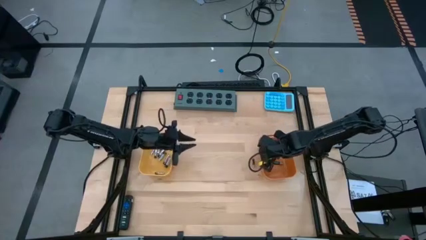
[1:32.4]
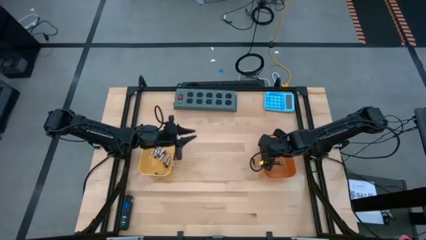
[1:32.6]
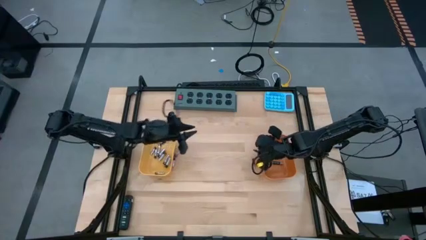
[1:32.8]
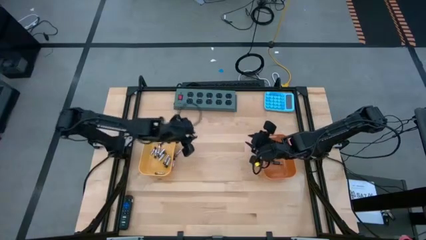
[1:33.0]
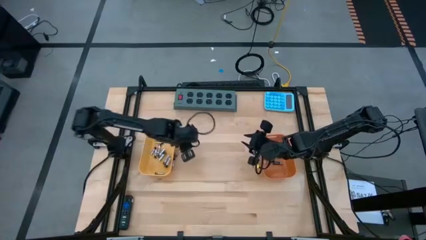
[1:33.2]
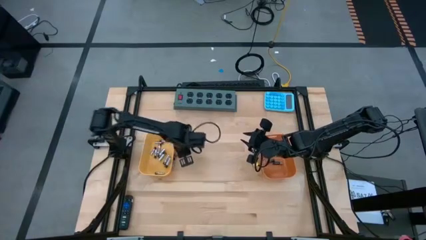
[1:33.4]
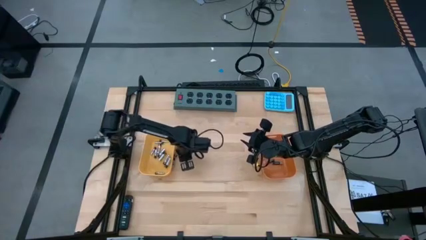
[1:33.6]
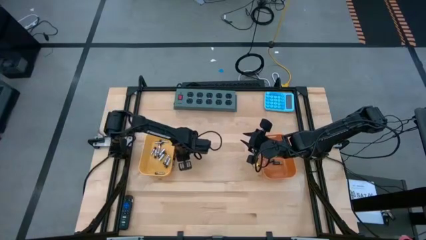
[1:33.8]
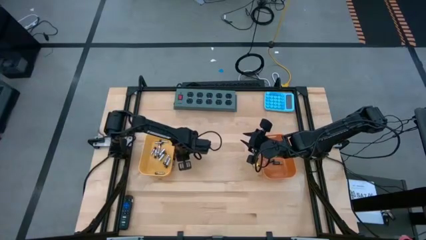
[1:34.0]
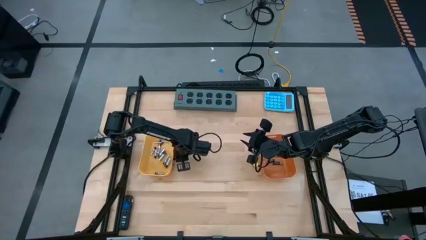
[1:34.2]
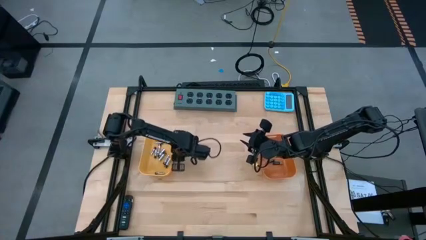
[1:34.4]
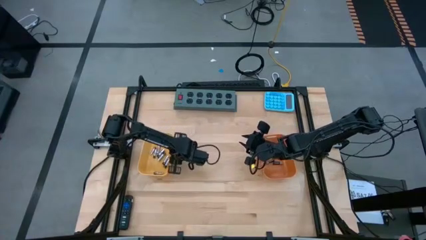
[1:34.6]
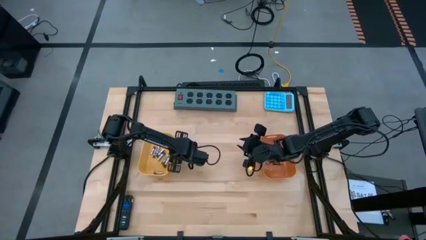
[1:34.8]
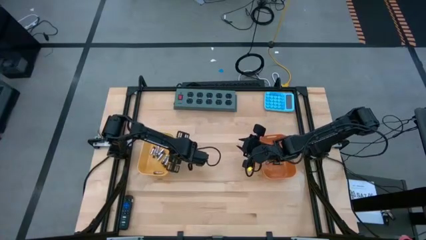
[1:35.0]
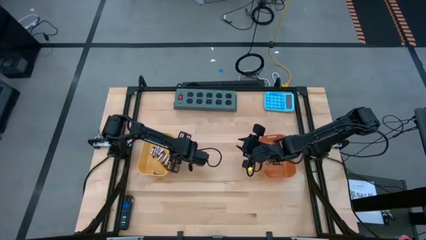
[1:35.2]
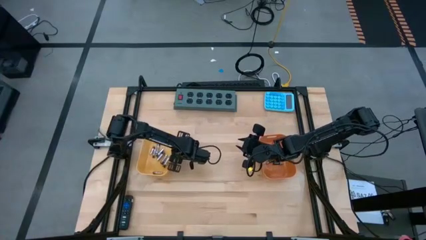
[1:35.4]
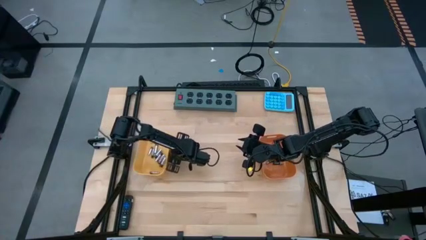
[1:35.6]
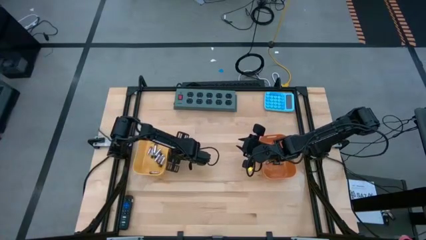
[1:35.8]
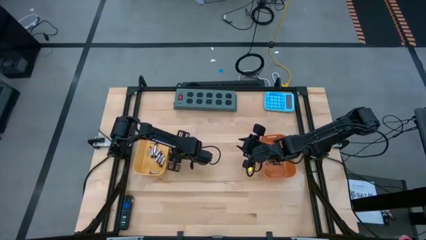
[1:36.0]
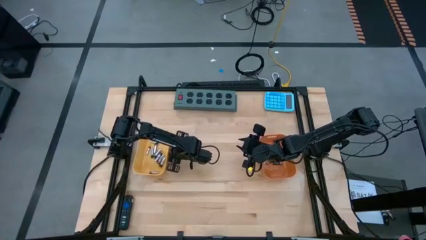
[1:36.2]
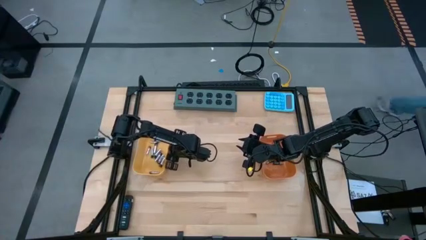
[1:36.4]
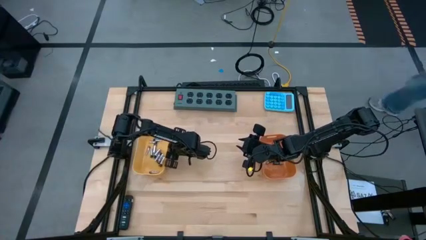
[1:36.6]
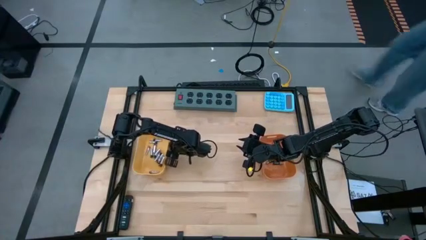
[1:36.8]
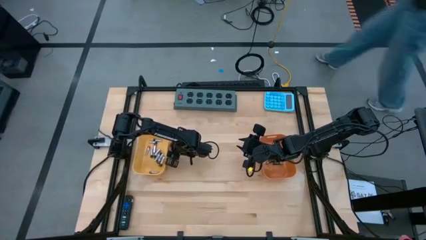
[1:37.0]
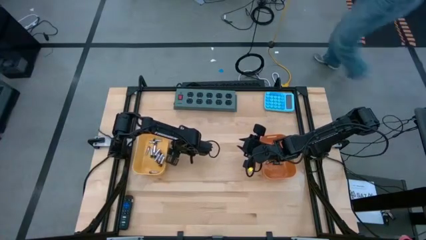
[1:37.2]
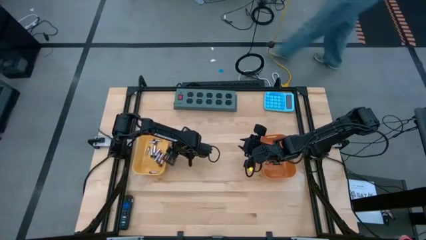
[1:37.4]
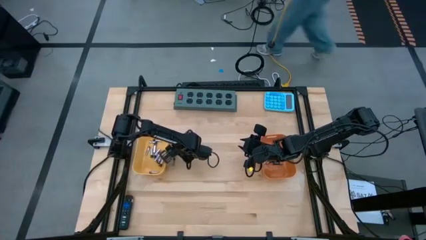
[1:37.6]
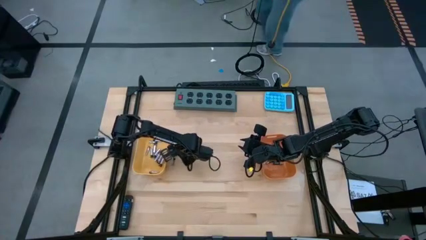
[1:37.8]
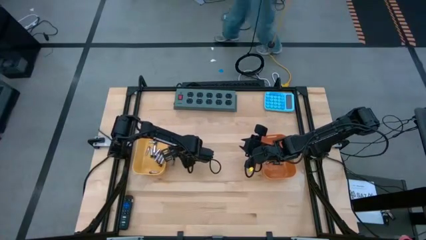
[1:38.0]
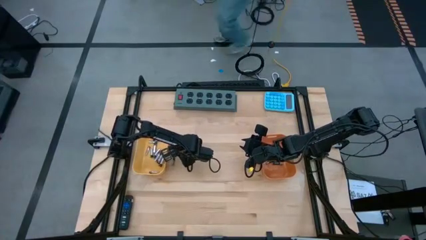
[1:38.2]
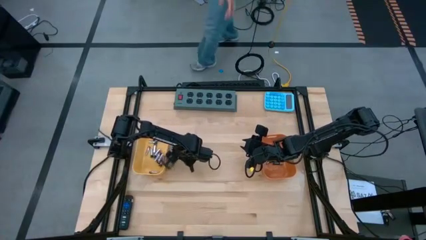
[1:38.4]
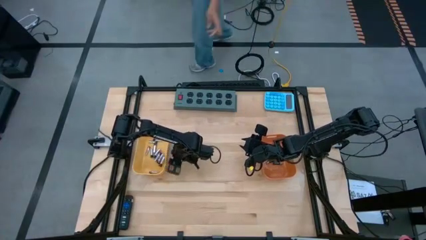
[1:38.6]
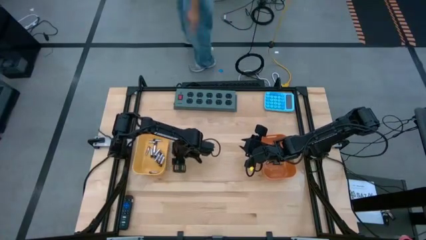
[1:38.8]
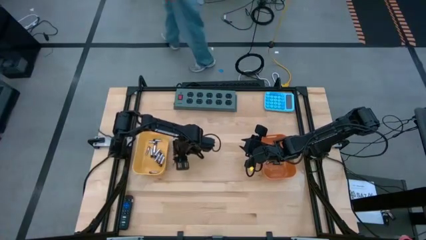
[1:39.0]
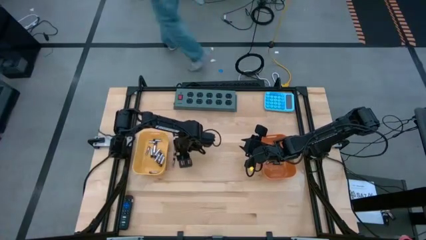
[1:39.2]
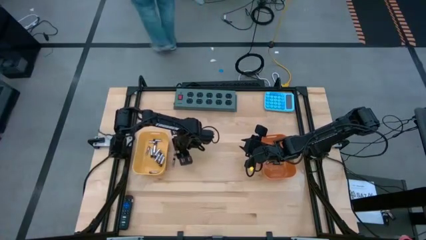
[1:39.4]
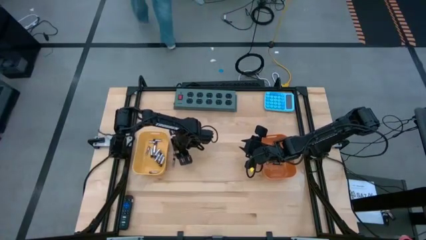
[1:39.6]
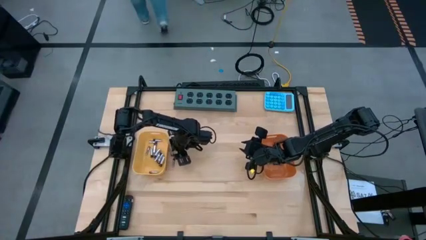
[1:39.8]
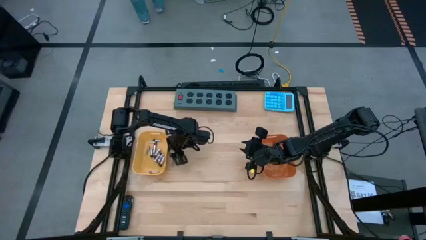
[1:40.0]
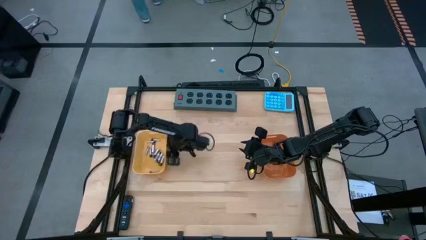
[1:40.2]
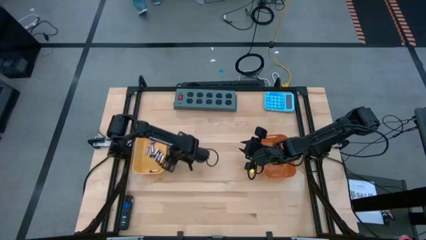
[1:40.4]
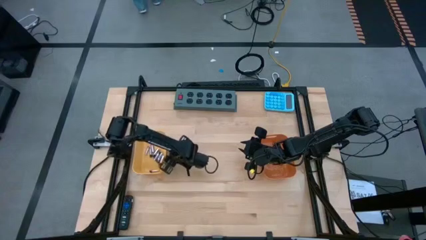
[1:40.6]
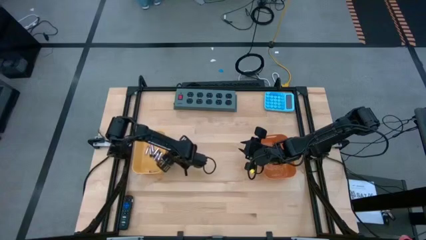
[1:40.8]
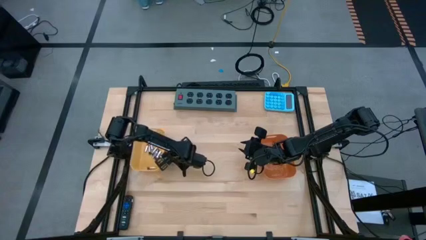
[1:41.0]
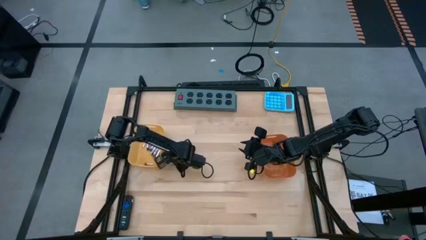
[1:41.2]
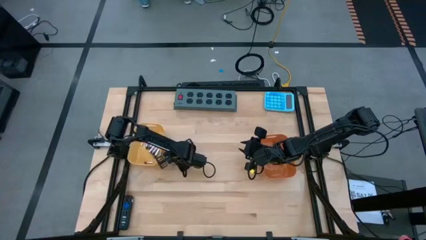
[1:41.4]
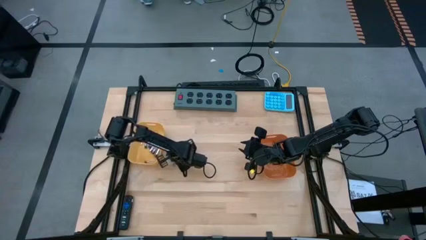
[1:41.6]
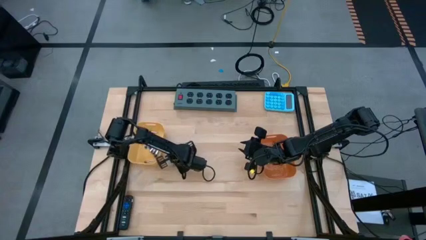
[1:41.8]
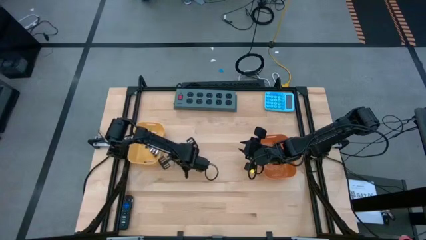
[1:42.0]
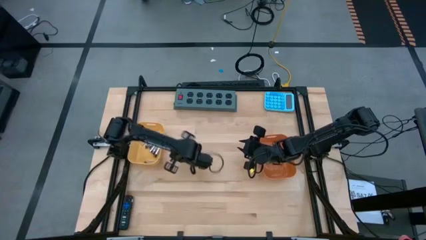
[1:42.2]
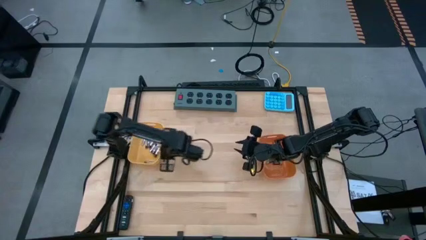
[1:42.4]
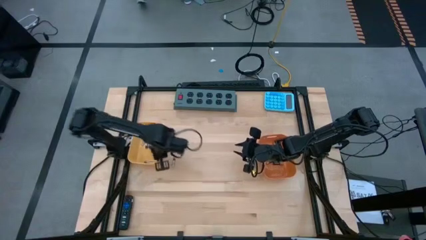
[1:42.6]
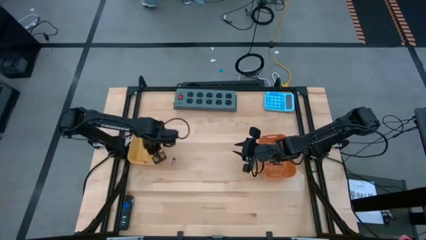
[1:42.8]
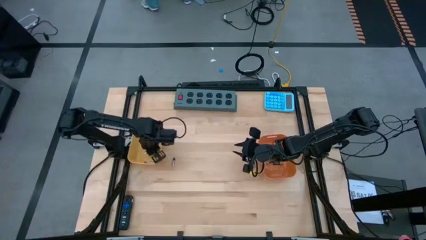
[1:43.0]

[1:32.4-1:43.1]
Task: Sort batteries
Put the silver battery into the yellow bin

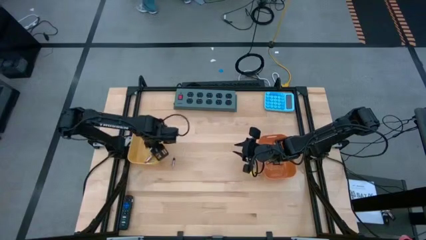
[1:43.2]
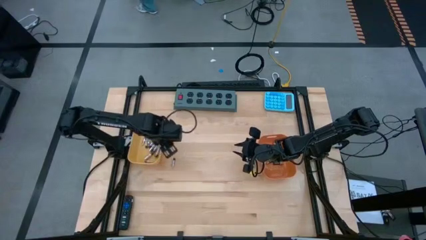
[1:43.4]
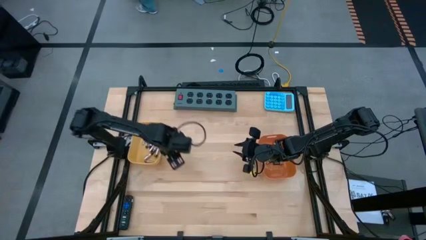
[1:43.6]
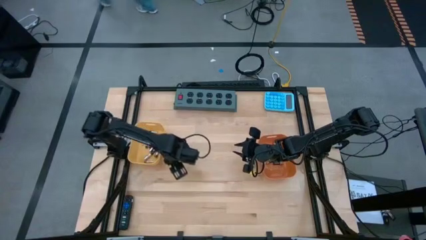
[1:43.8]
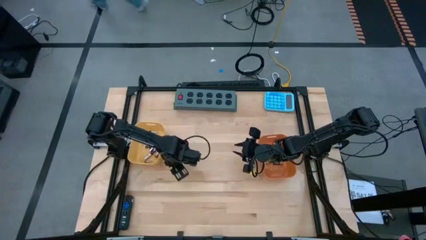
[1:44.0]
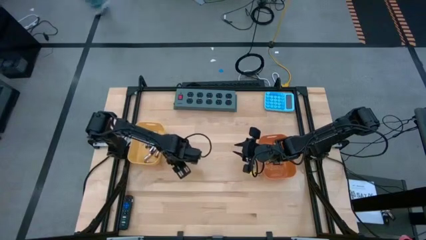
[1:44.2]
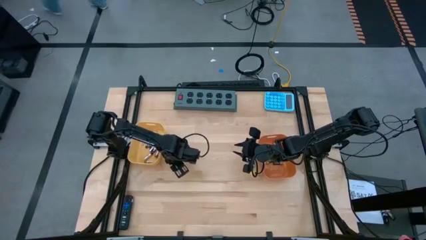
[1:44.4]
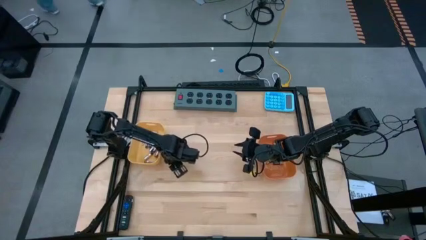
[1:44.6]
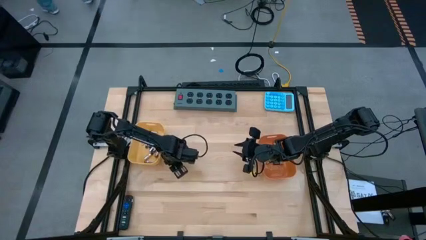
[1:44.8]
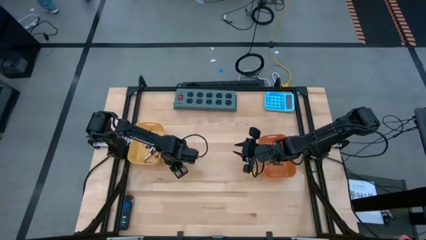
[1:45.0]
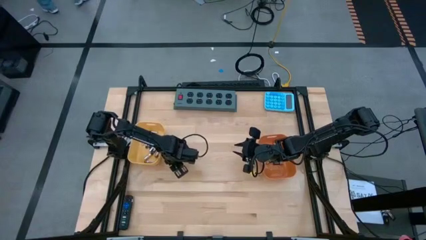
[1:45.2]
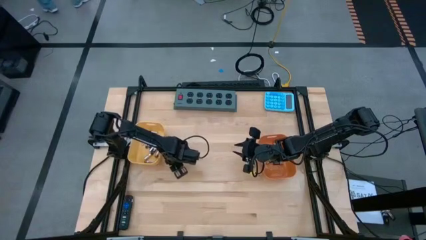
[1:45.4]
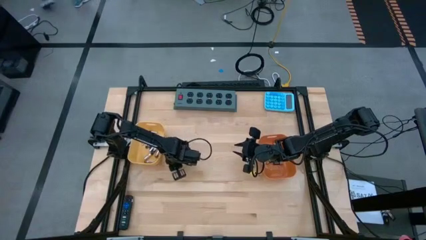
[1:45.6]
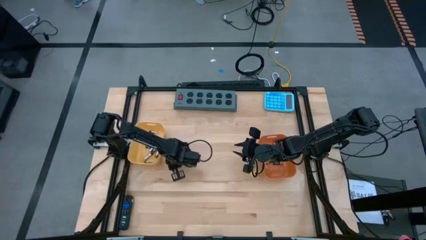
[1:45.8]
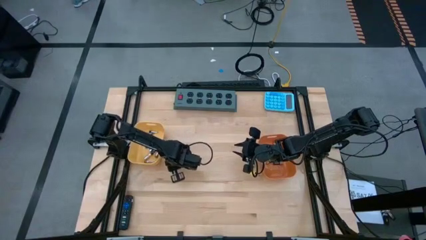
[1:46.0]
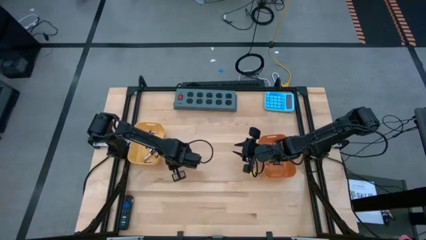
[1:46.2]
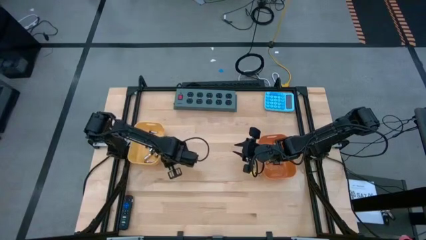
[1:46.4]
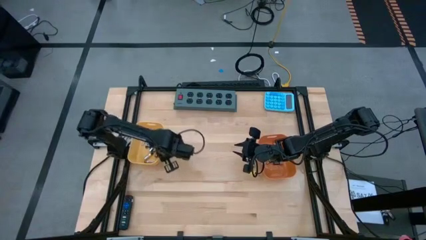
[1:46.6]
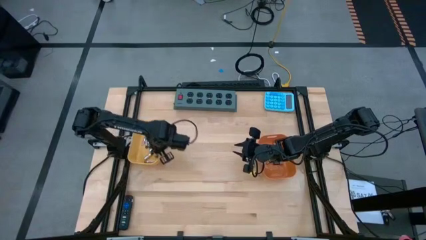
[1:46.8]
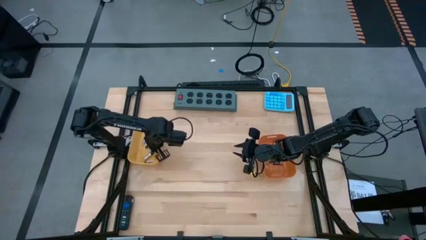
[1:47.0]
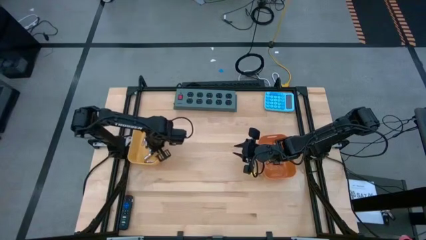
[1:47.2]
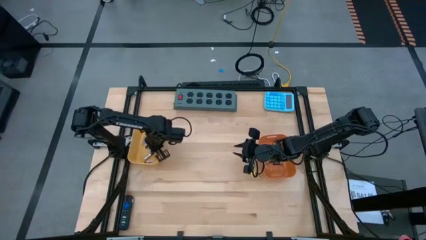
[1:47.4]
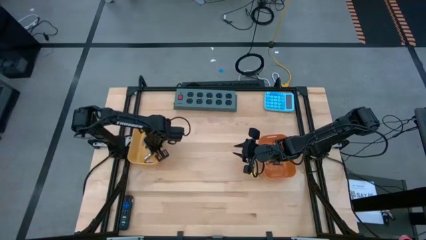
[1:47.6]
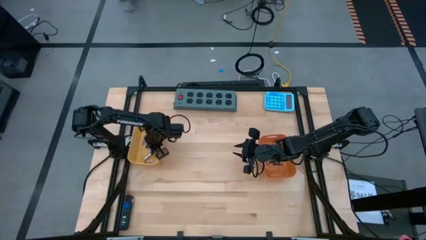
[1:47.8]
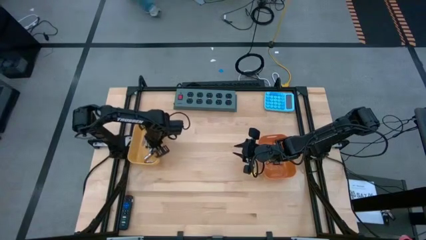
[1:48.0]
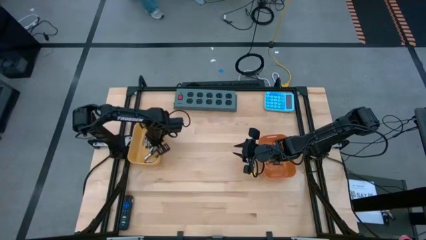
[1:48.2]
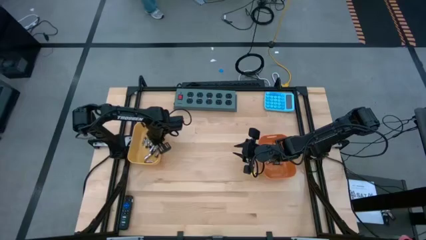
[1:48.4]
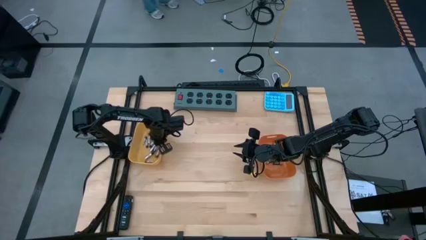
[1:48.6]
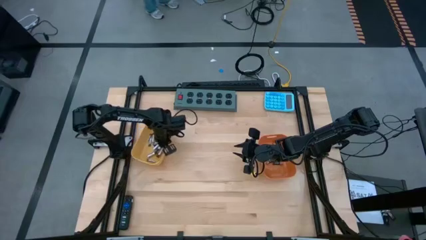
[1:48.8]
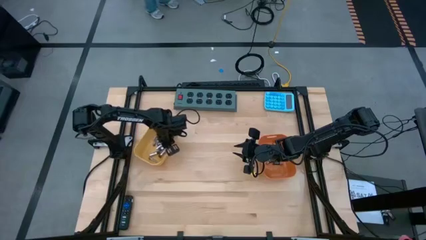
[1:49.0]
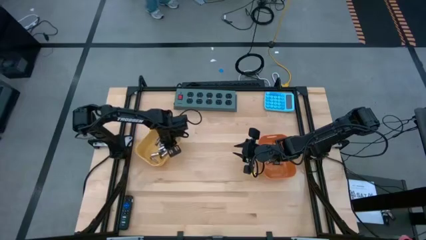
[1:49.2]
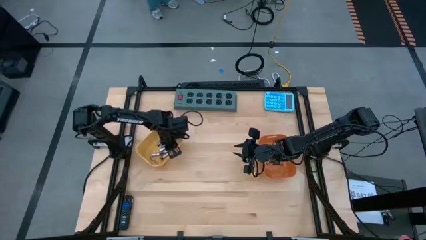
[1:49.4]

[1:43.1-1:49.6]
Put the silver battery into the yellow bin
